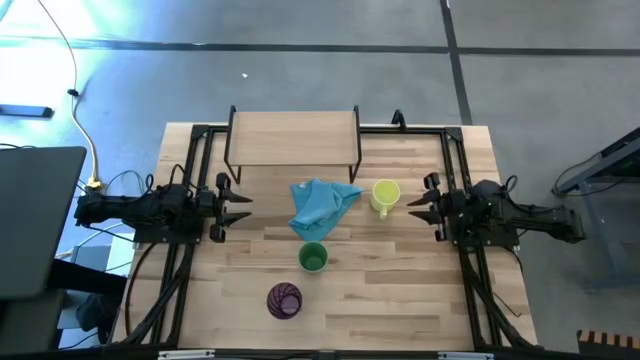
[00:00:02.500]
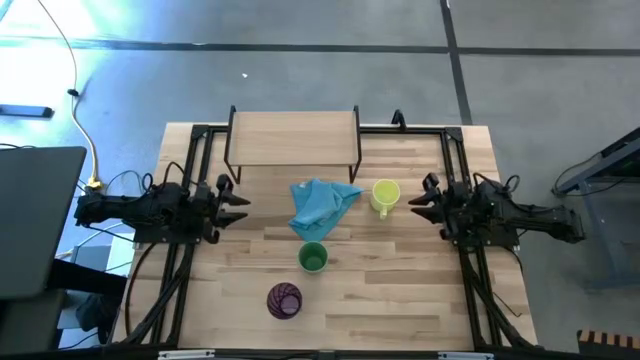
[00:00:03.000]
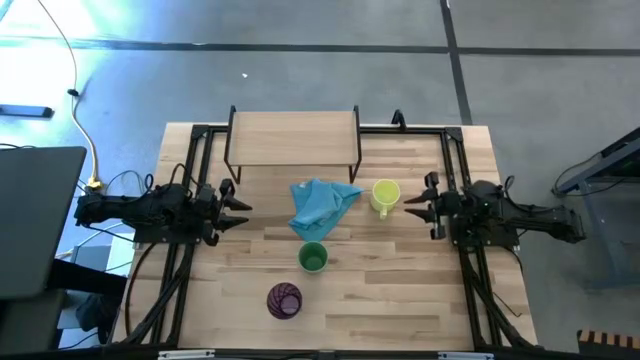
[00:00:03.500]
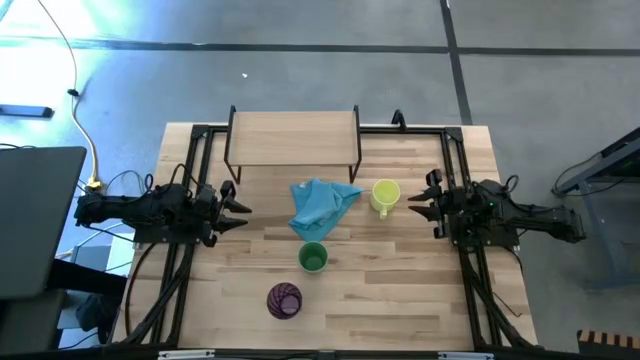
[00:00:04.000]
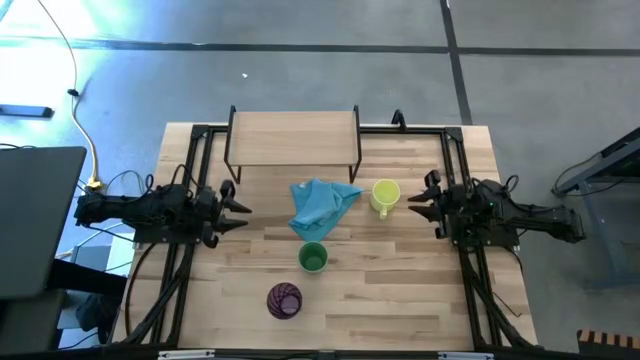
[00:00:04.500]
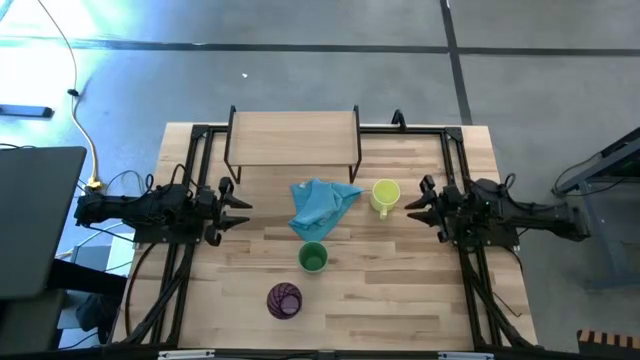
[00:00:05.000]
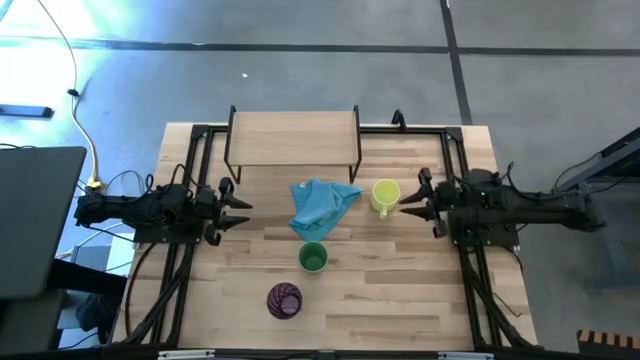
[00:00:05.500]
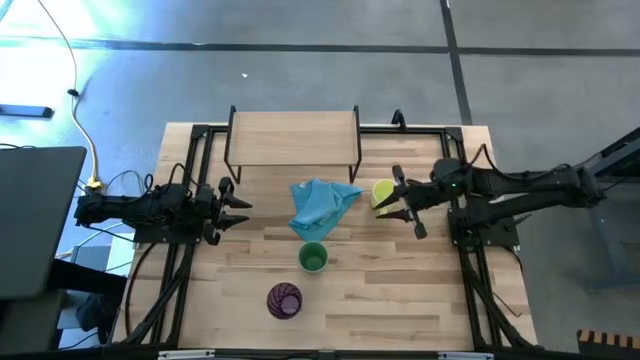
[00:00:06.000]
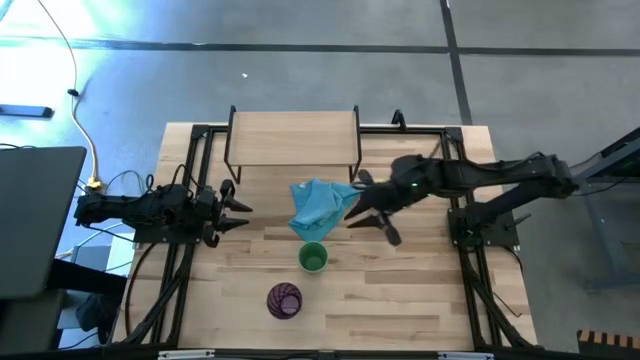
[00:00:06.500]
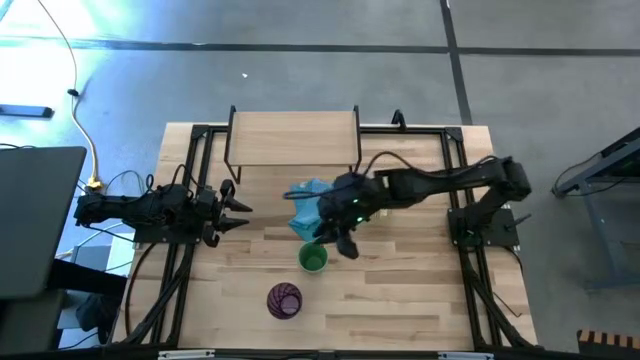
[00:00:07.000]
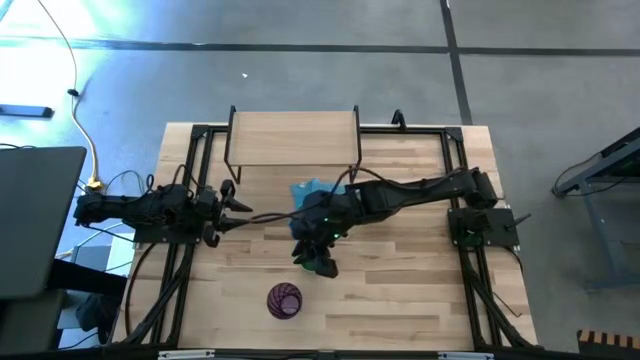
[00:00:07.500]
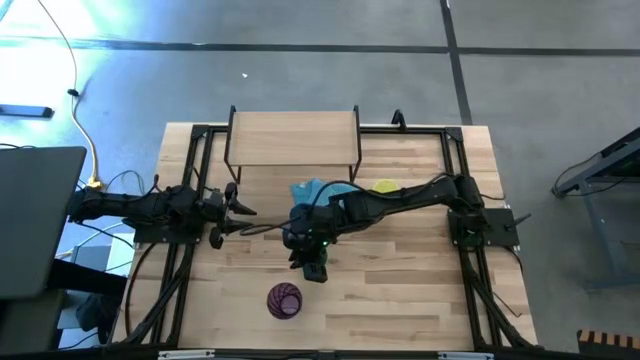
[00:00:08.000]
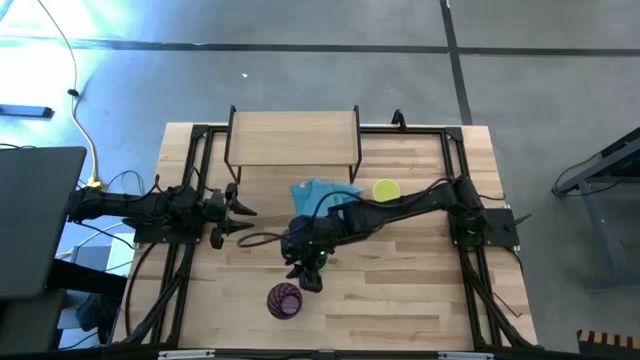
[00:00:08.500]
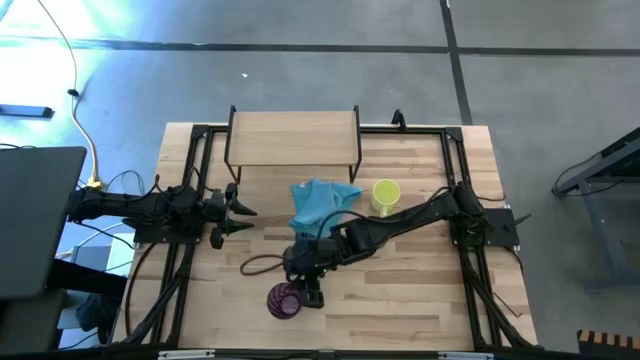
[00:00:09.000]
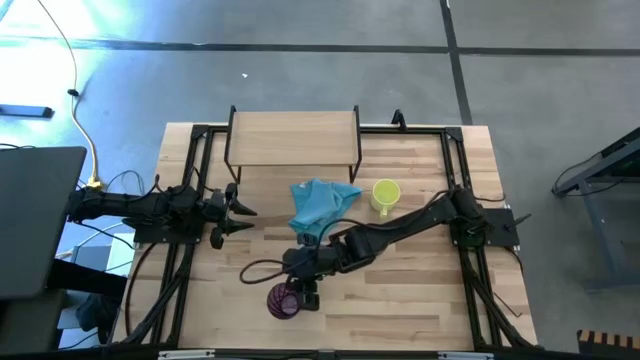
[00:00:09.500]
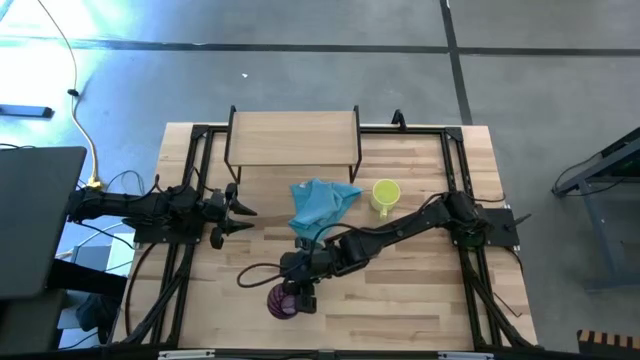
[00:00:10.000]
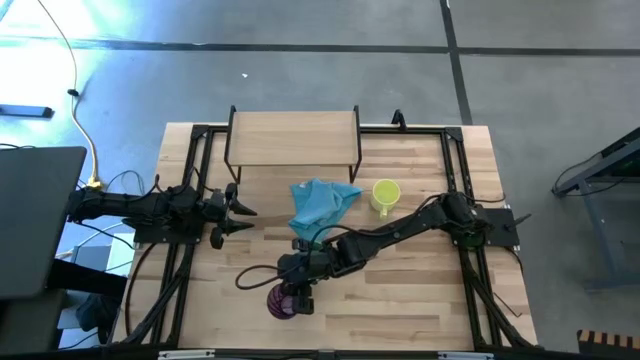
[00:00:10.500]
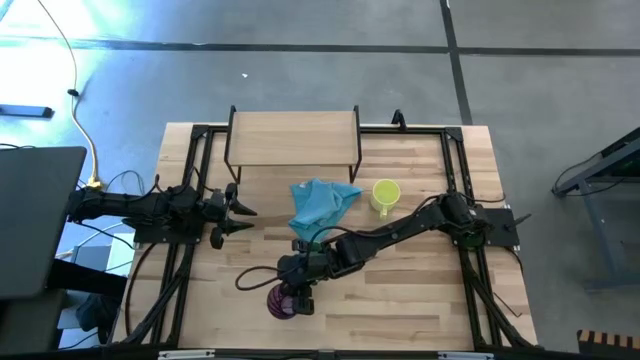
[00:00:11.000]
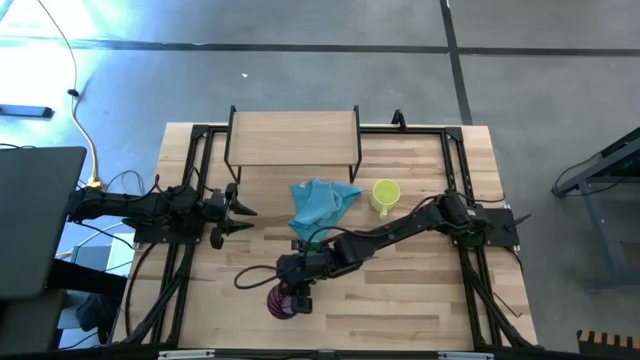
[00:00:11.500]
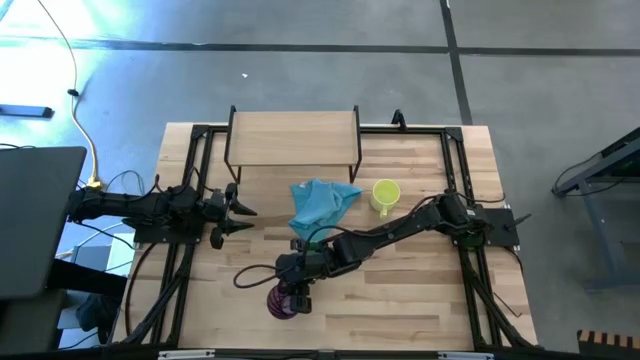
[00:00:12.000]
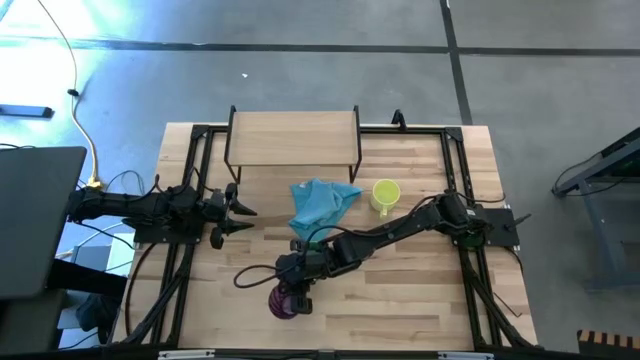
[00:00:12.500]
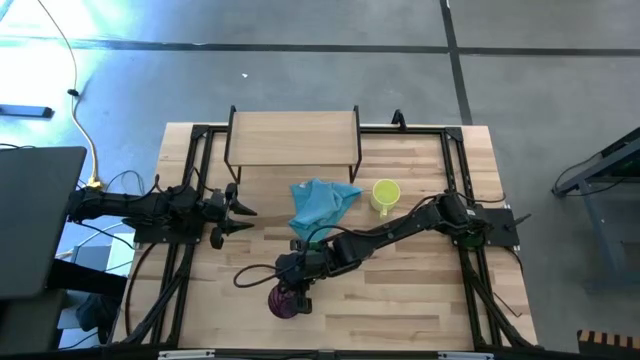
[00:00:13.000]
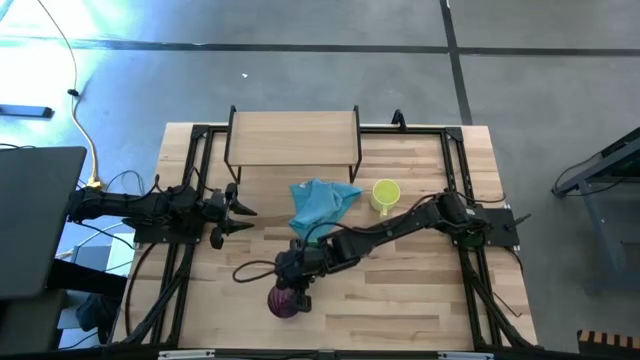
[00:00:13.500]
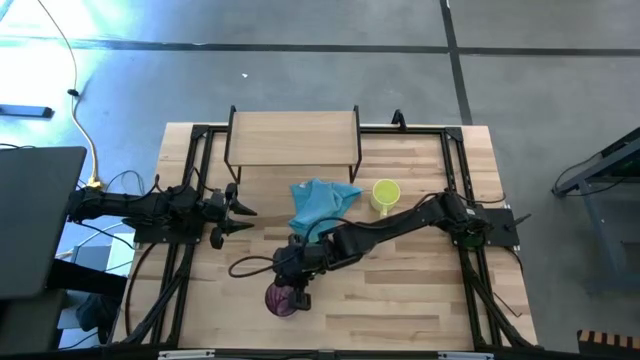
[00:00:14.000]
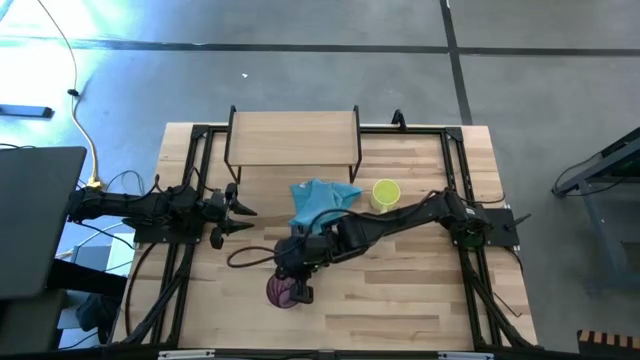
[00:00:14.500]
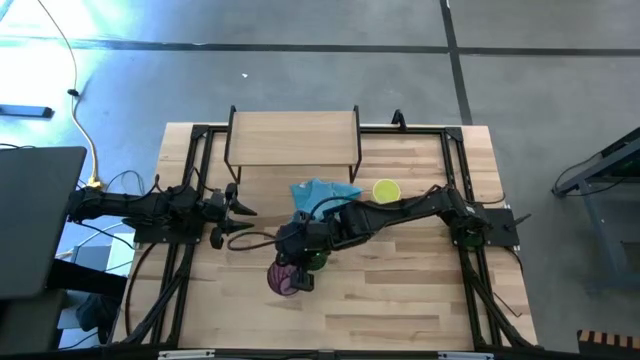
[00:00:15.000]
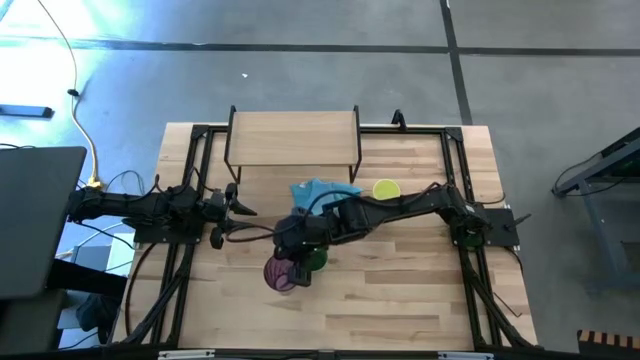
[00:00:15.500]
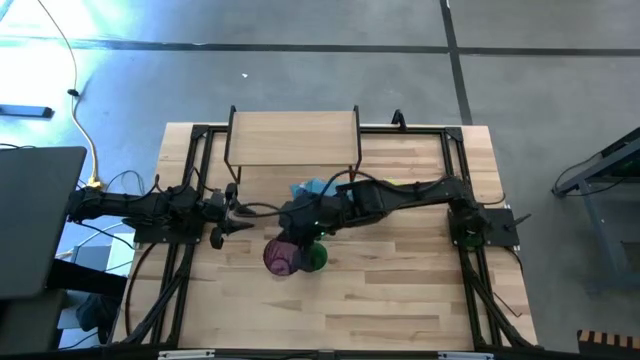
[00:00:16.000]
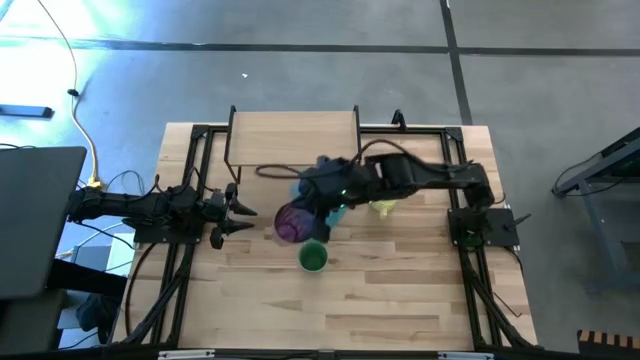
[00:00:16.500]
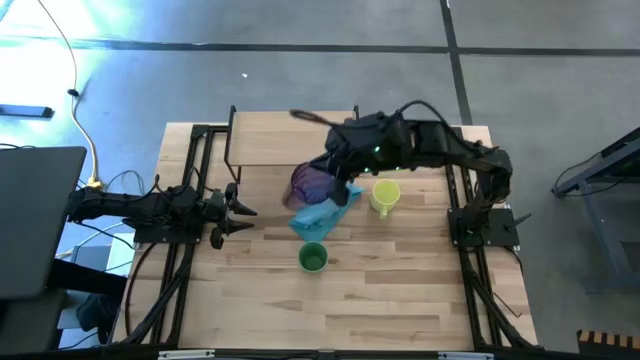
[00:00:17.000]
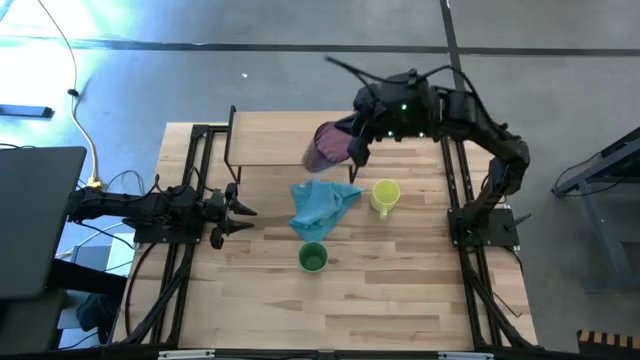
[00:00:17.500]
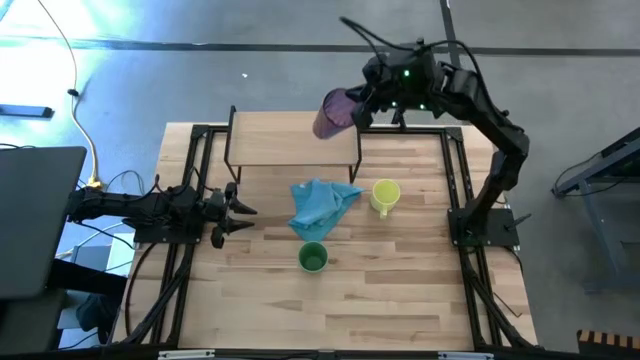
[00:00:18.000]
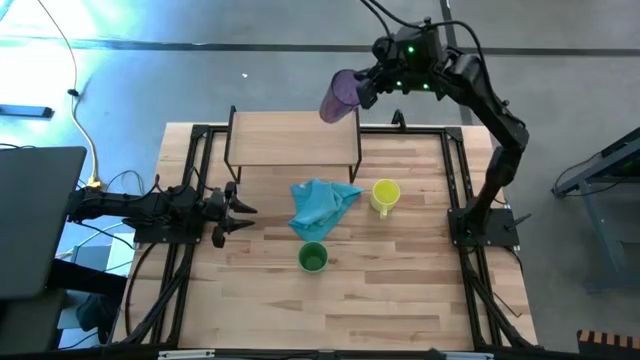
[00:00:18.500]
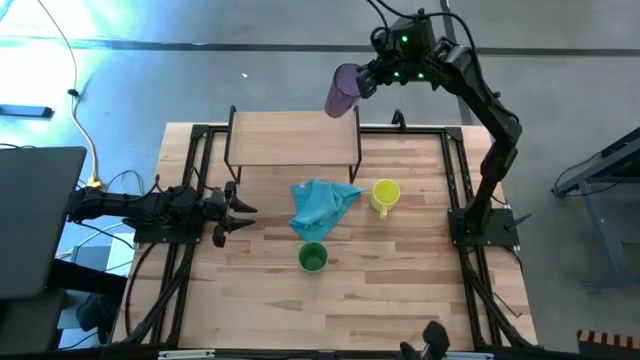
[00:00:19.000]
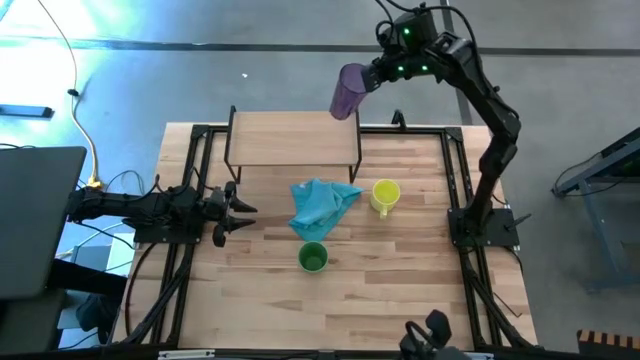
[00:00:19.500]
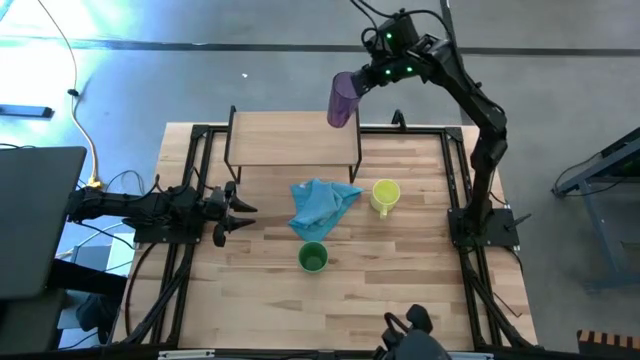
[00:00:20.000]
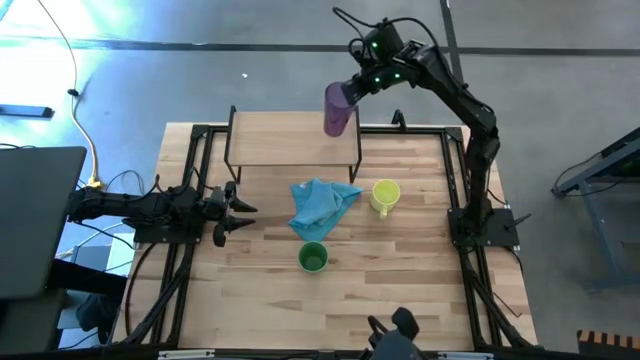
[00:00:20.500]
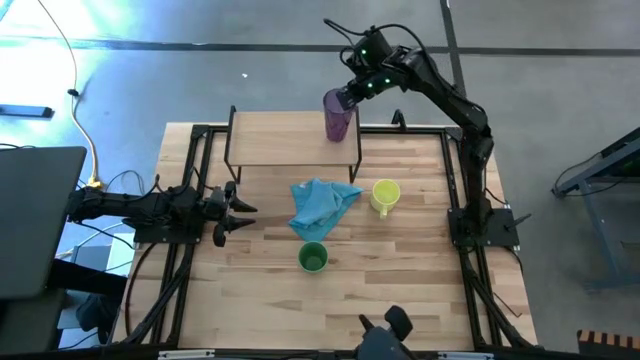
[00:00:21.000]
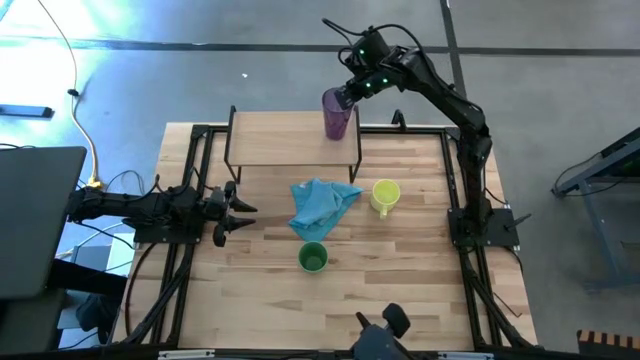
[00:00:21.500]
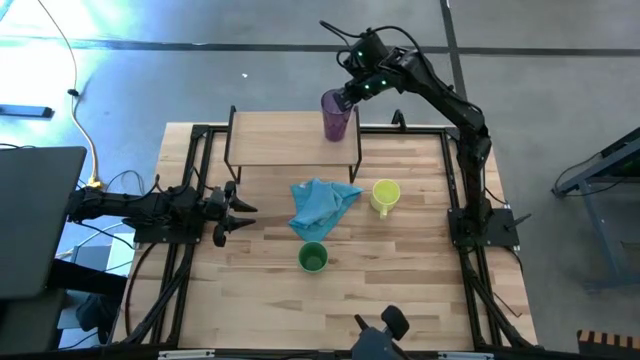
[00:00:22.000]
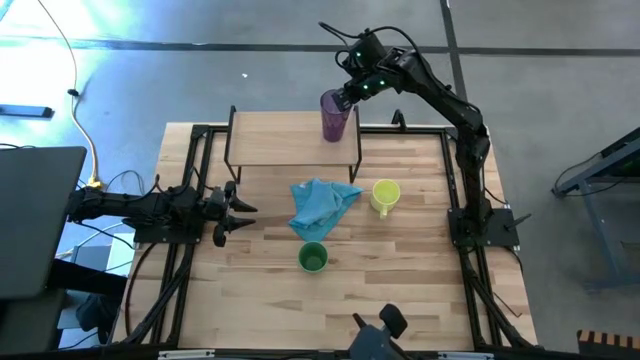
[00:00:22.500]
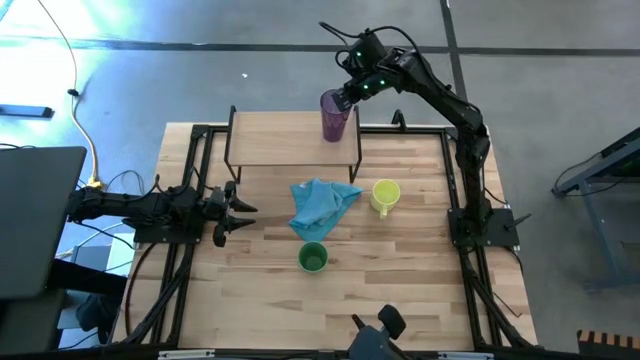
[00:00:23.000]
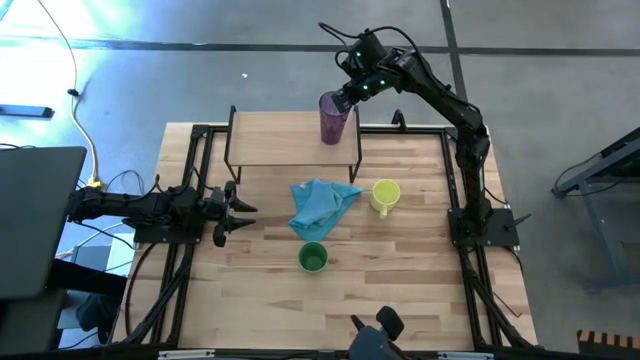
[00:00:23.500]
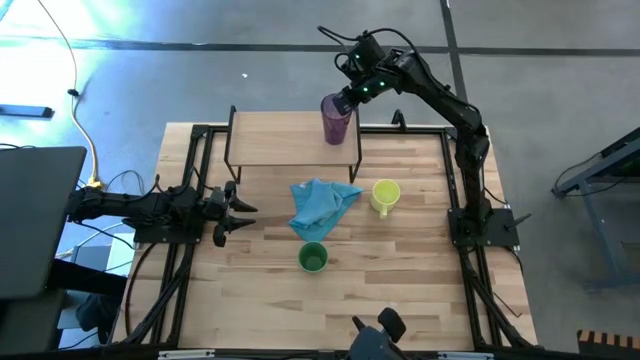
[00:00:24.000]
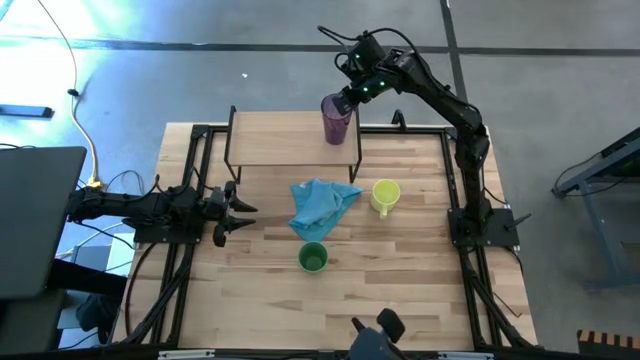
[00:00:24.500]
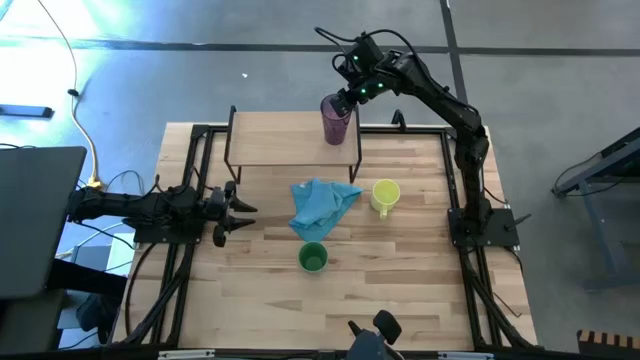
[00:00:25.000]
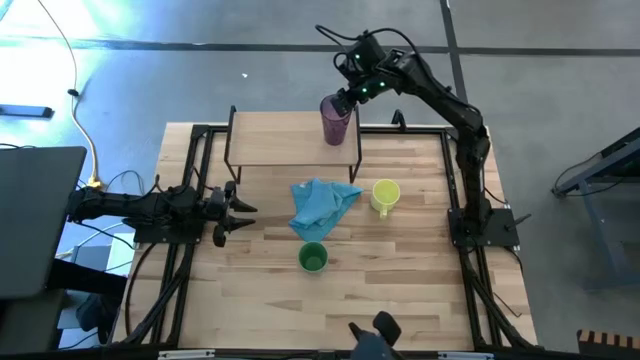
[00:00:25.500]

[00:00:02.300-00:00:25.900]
Task: Stack small to large cups/mugs on shelf
Put the violet cup on the shelf
